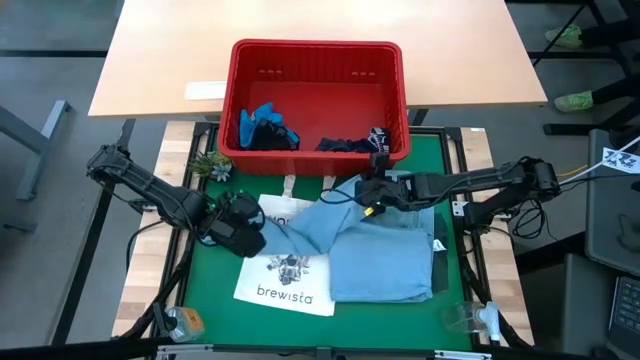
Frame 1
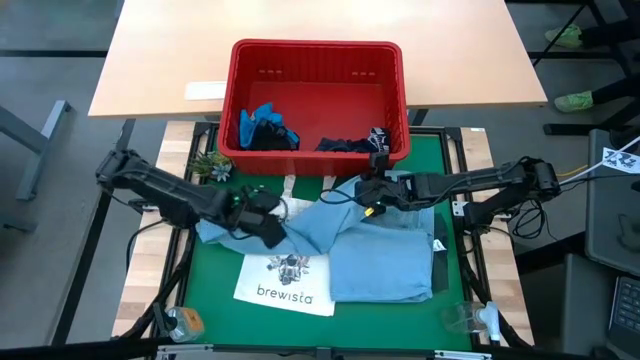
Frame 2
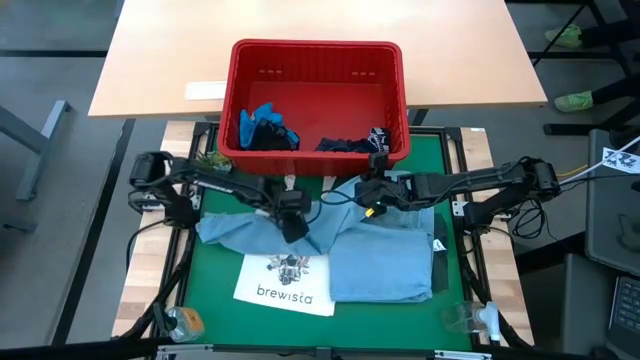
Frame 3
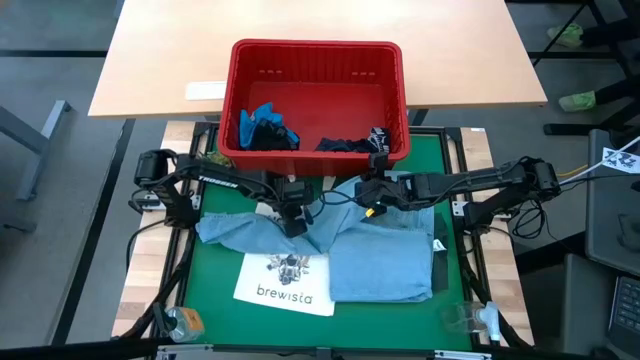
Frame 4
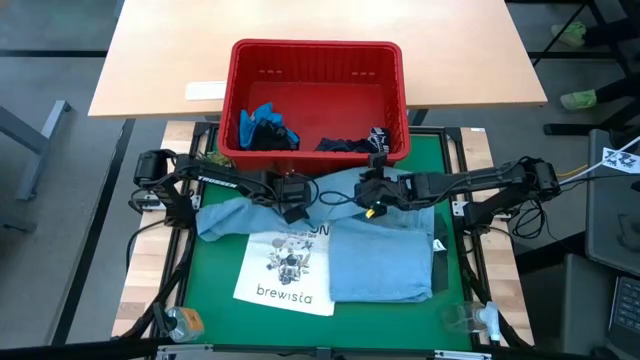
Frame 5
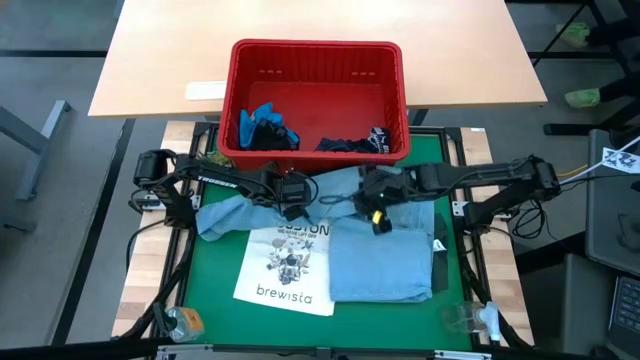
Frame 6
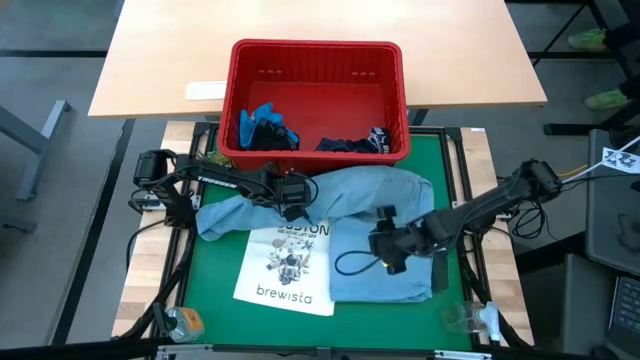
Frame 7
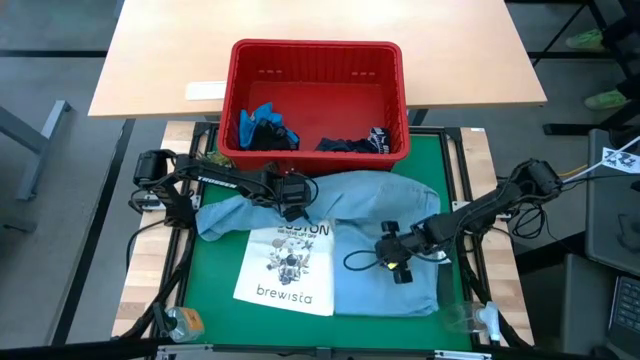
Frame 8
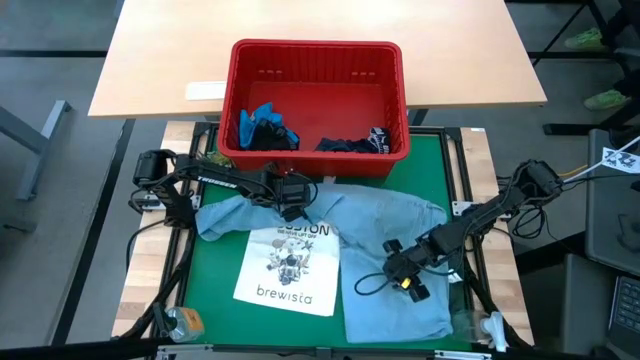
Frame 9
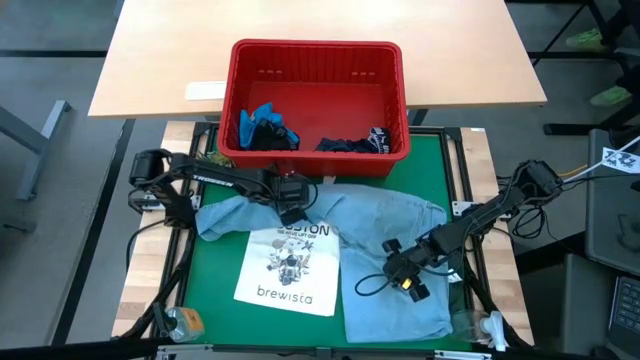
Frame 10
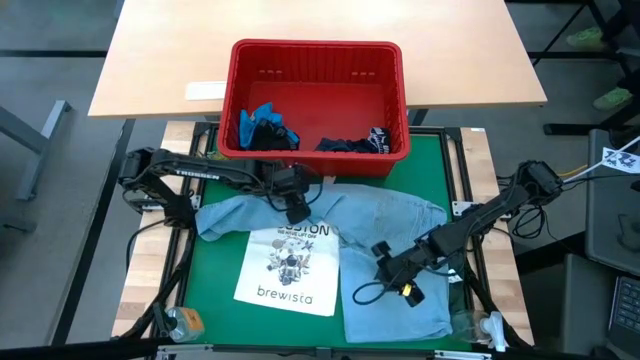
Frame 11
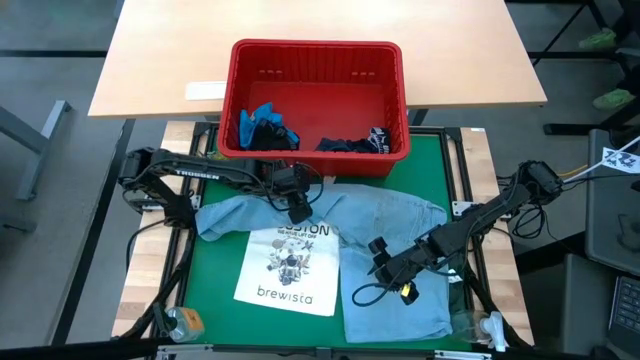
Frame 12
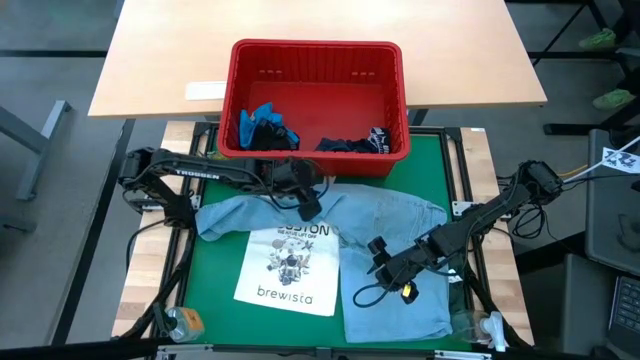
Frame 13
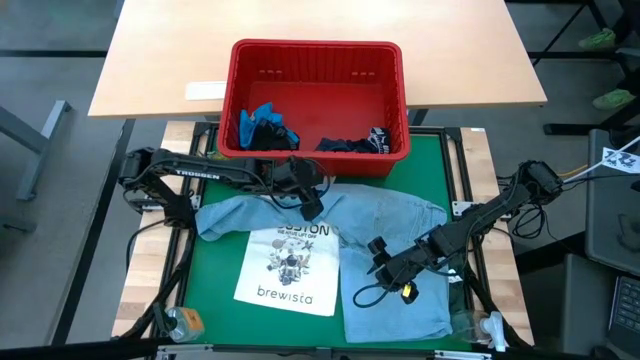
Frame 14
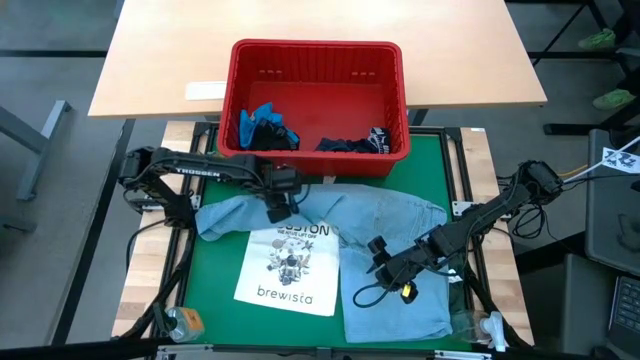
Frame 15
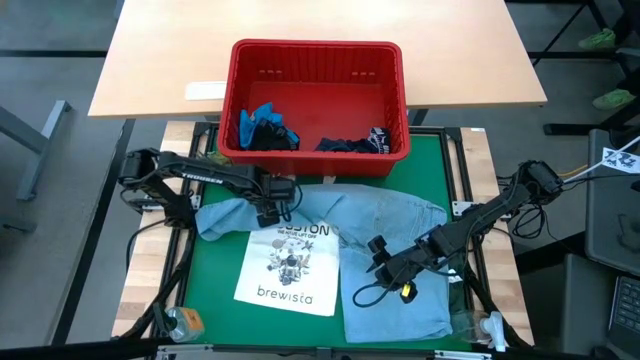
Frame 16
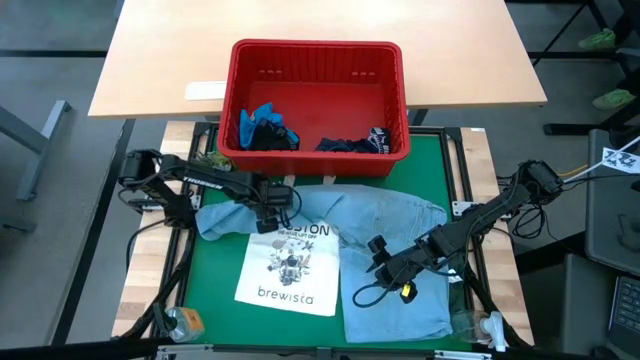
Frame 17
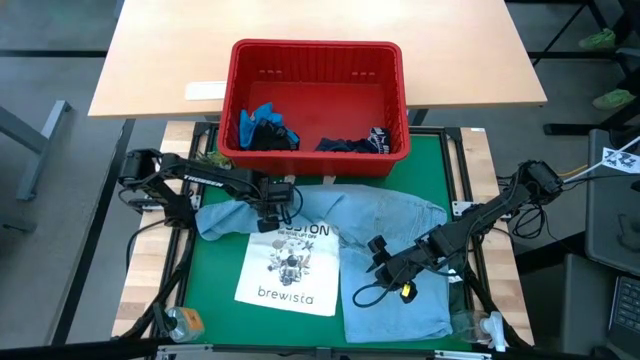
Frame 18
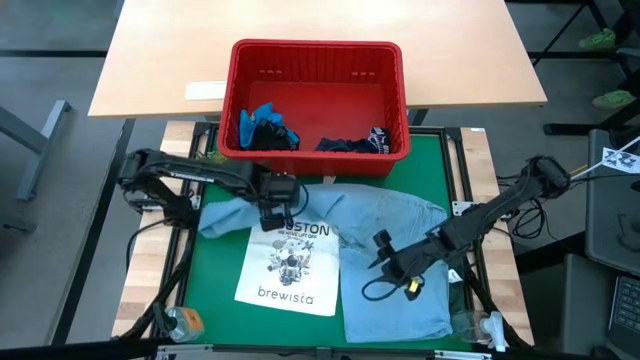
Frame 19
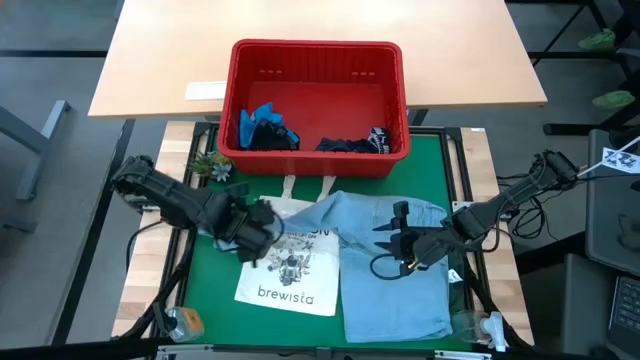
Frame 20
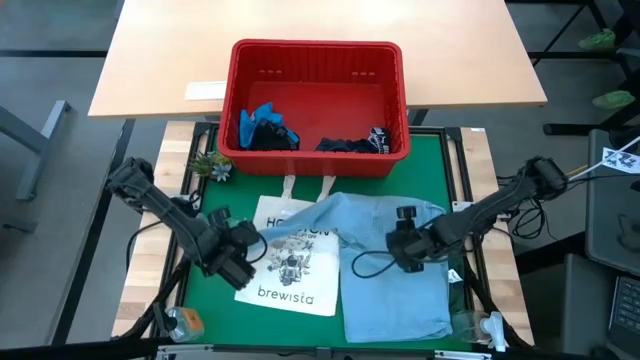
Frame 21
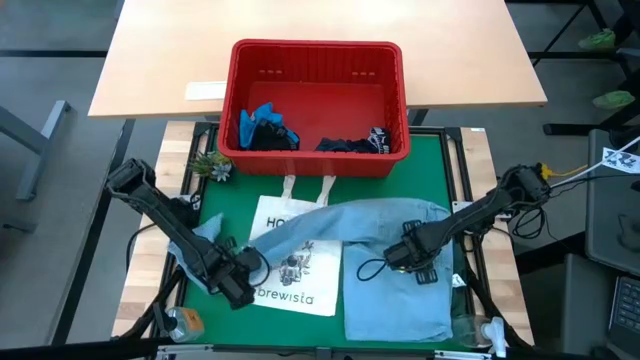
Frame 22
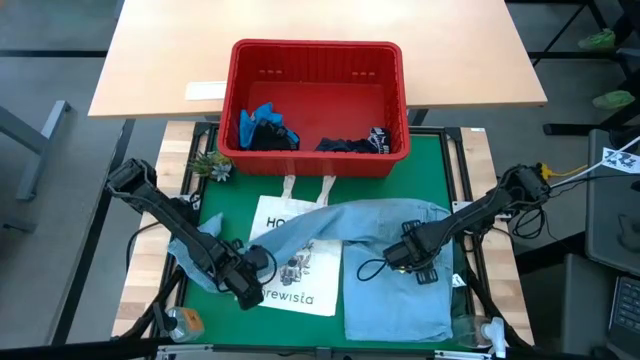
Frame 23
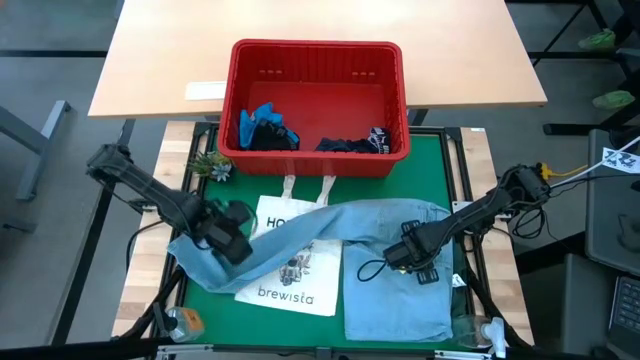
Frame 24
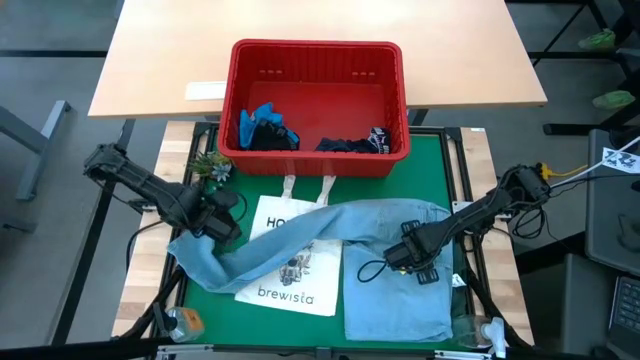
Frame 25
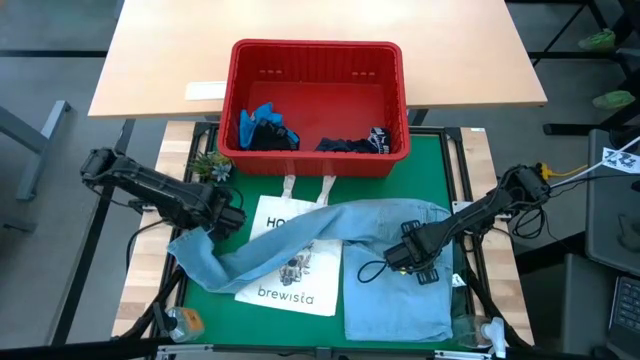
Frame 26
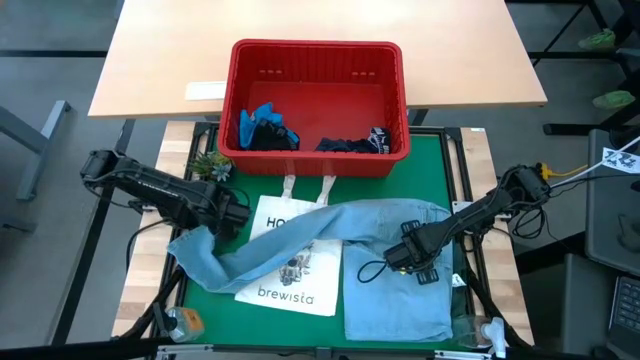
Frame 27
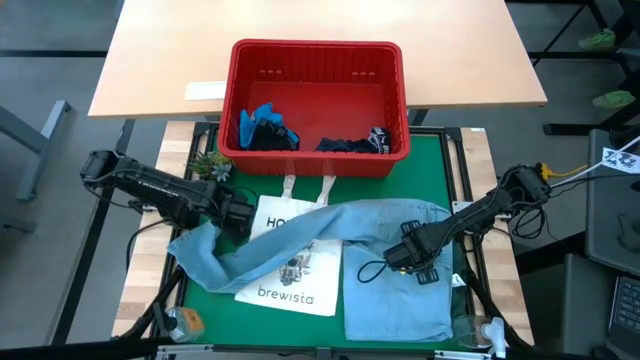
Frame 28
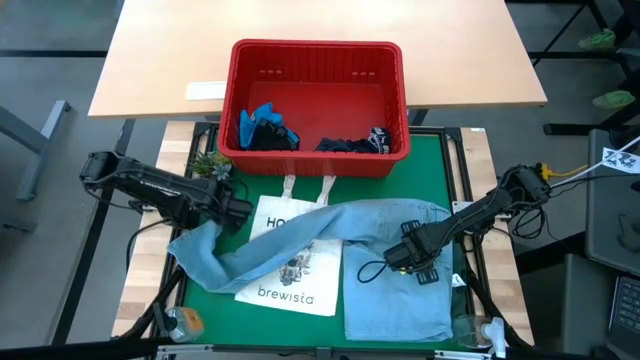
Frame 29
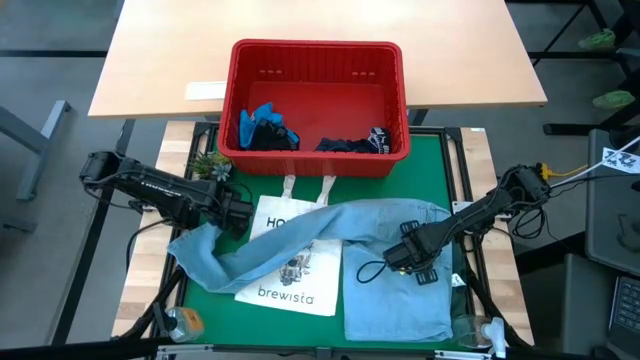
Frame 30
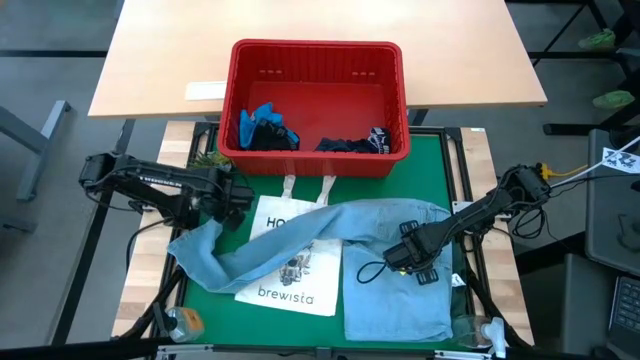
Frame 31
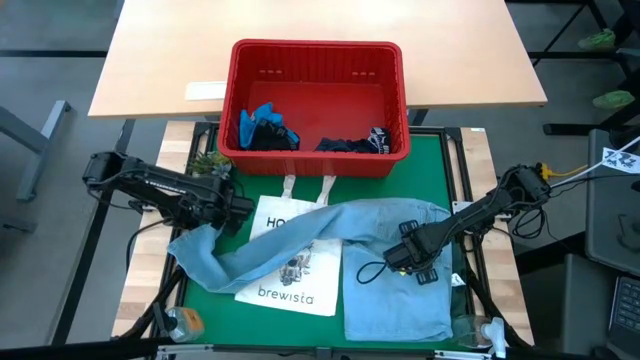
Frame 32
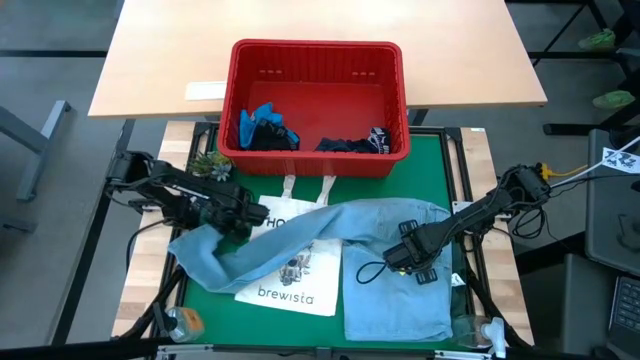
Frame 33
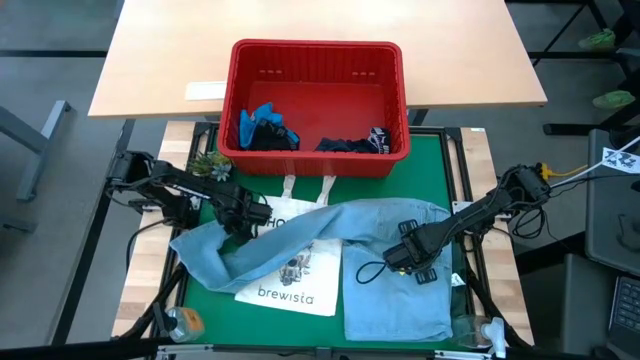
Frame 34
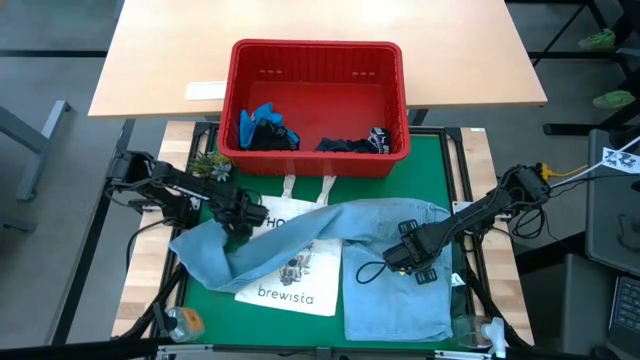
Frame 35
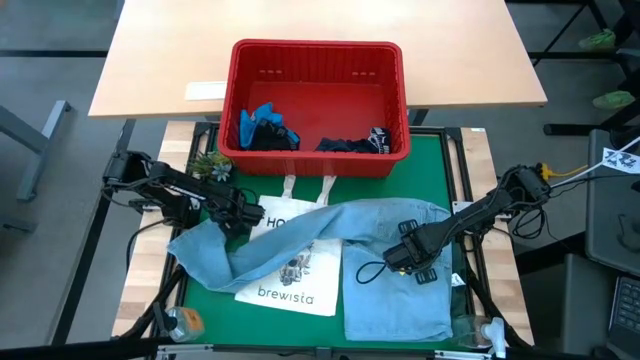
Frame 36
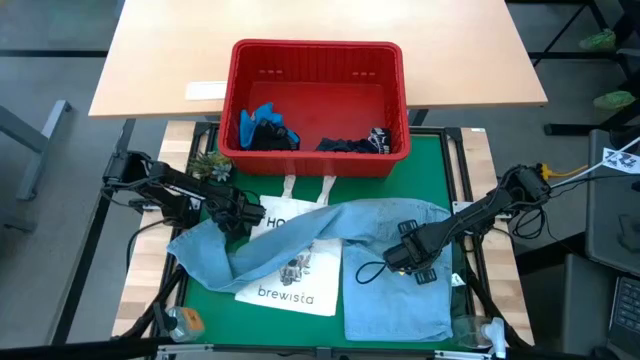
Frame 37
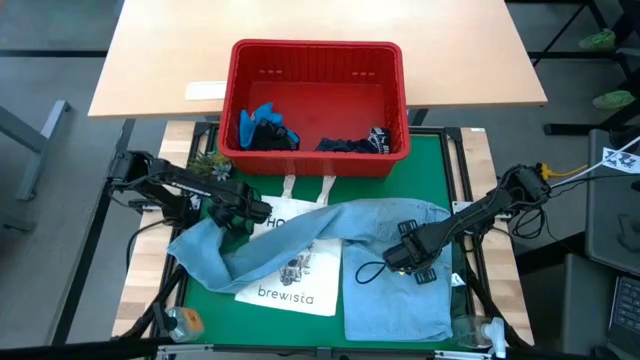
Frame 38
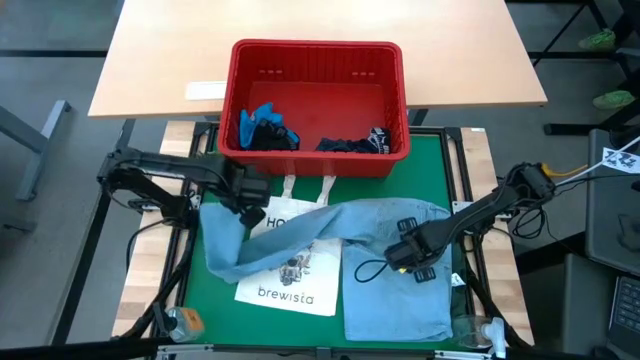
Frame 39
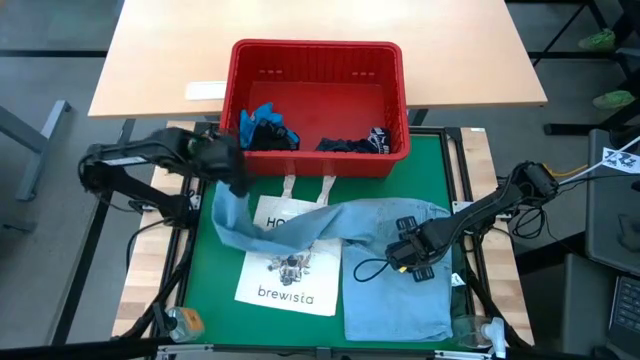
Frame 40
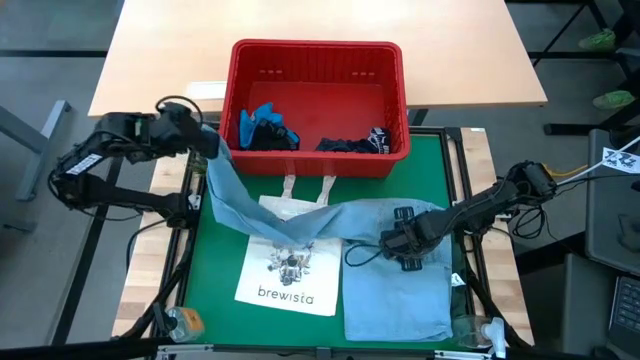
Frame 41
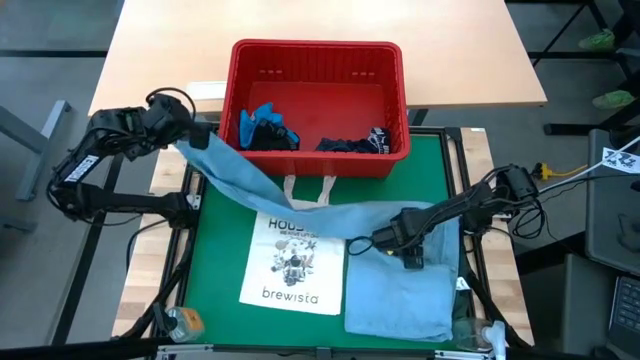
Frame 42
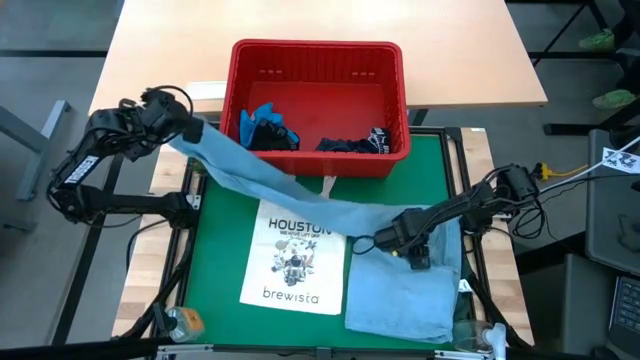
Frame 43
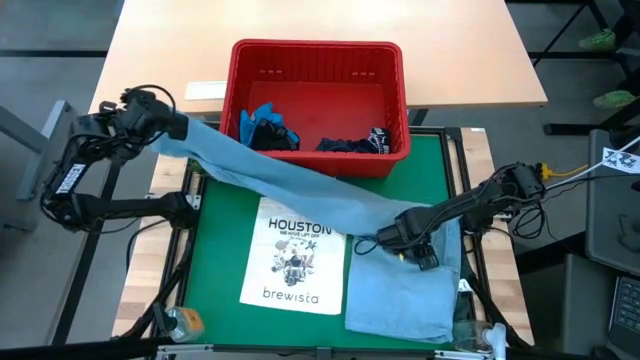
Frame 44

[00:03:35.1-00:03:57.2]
Task: Fold Laundry from Bin
Fold the light blue jeans
